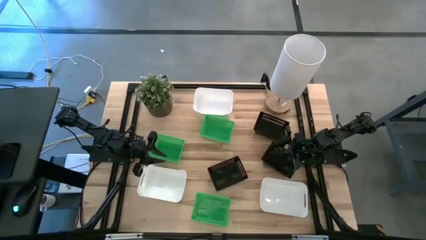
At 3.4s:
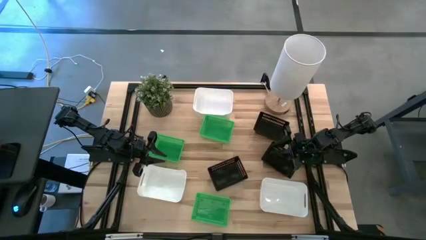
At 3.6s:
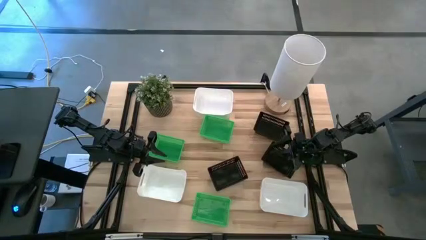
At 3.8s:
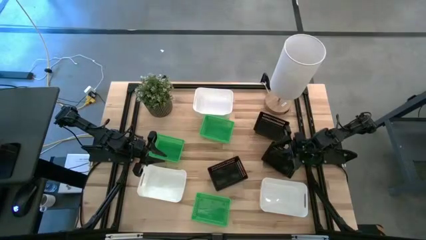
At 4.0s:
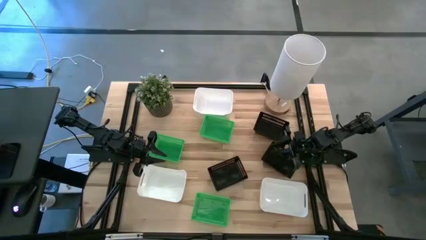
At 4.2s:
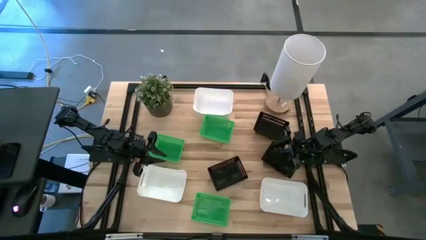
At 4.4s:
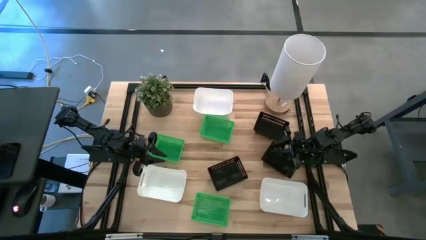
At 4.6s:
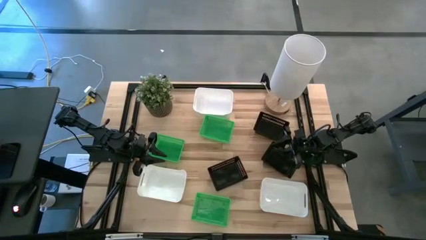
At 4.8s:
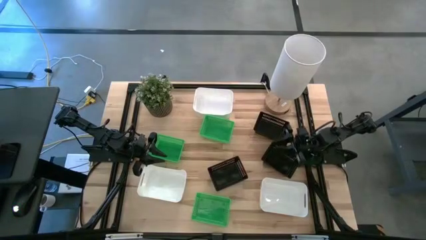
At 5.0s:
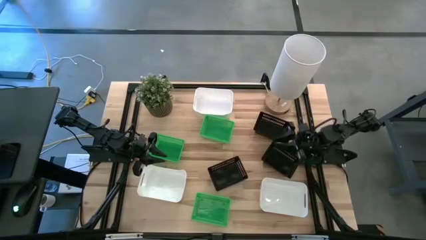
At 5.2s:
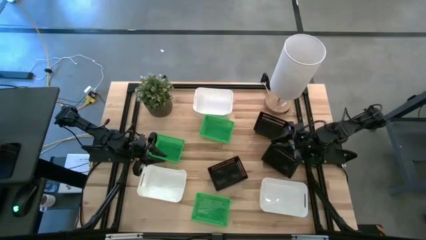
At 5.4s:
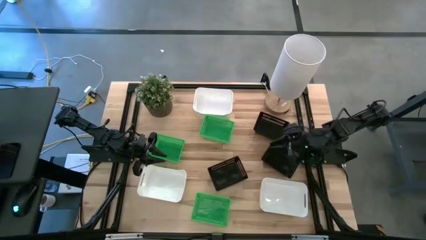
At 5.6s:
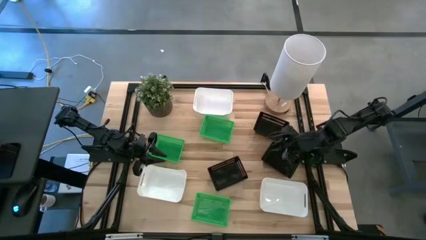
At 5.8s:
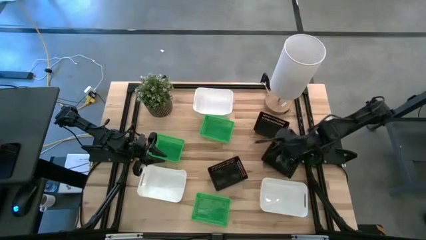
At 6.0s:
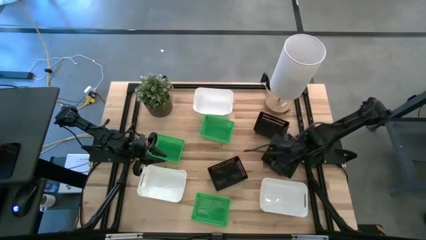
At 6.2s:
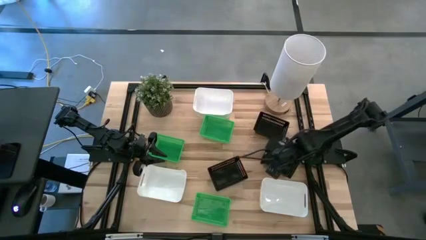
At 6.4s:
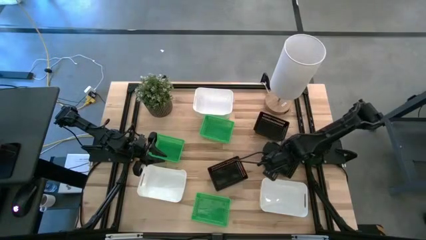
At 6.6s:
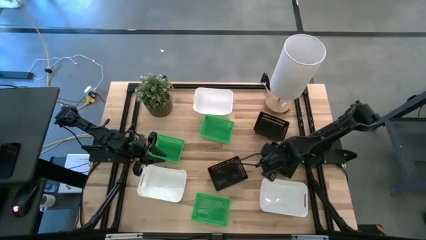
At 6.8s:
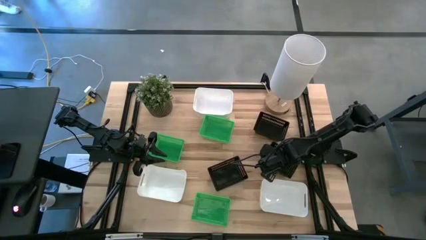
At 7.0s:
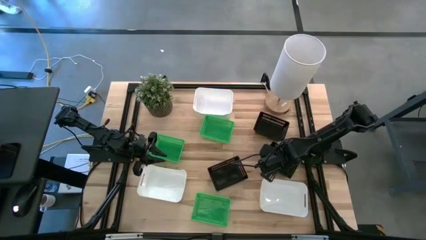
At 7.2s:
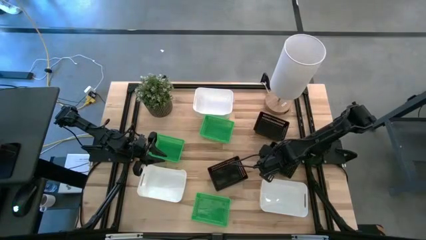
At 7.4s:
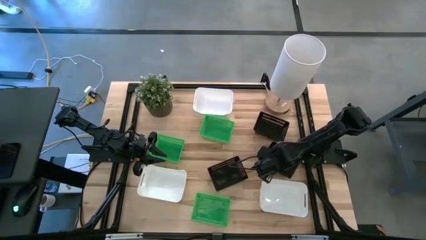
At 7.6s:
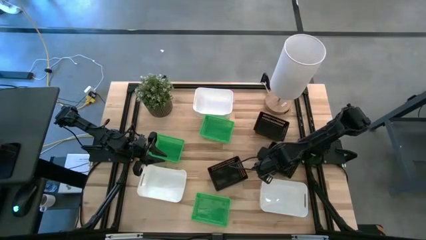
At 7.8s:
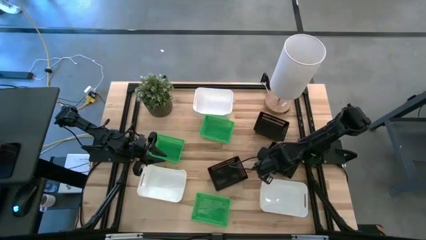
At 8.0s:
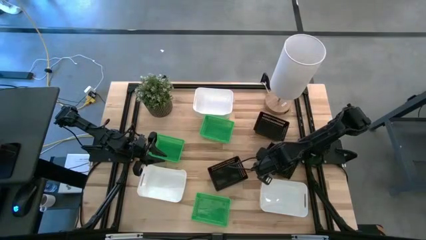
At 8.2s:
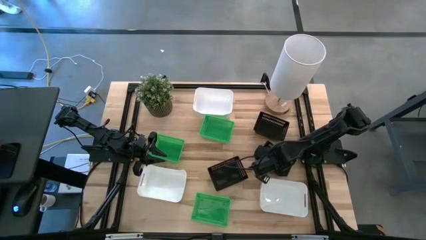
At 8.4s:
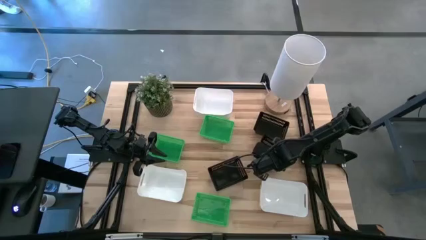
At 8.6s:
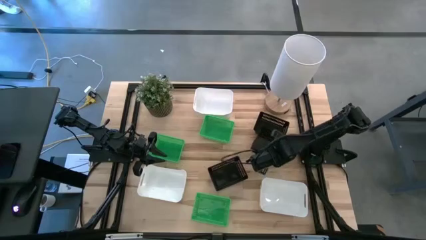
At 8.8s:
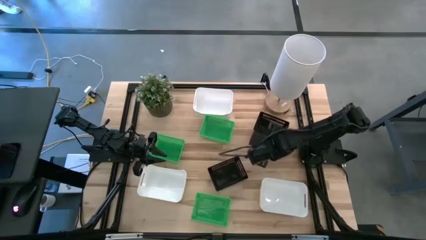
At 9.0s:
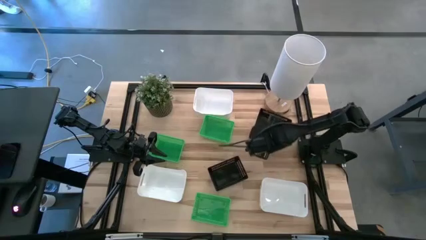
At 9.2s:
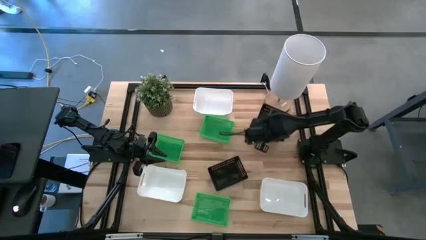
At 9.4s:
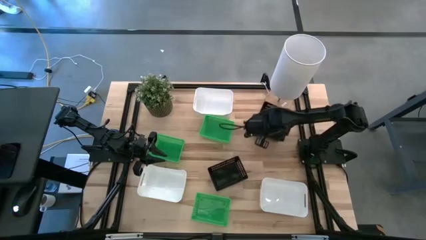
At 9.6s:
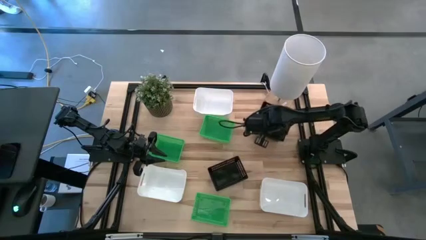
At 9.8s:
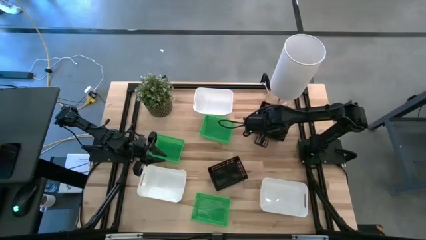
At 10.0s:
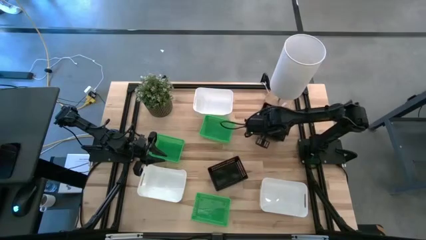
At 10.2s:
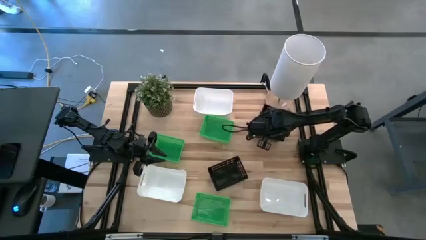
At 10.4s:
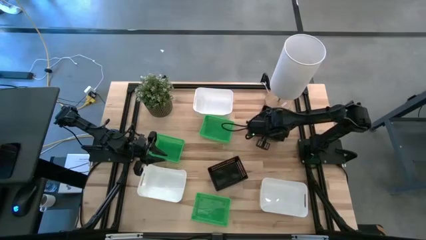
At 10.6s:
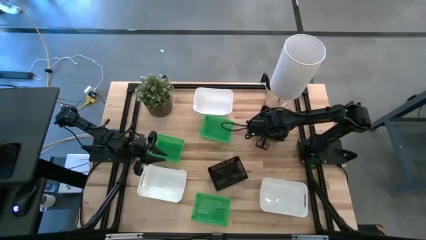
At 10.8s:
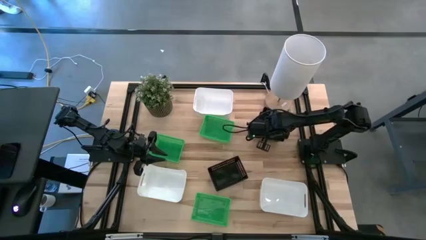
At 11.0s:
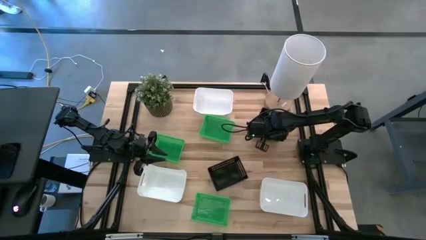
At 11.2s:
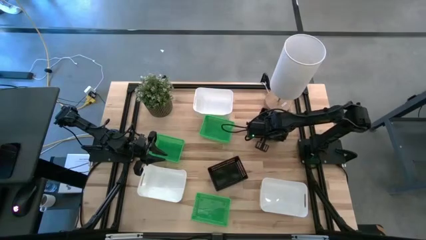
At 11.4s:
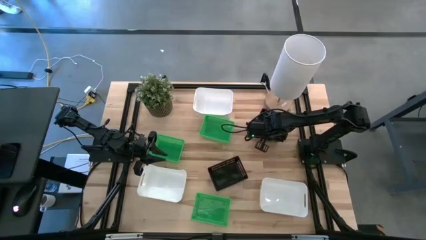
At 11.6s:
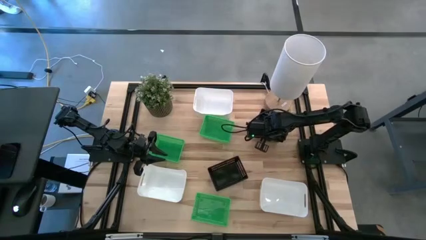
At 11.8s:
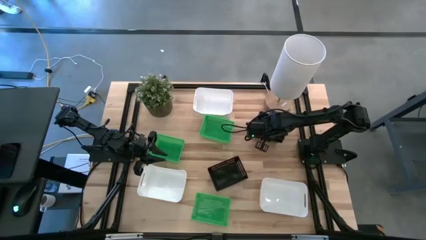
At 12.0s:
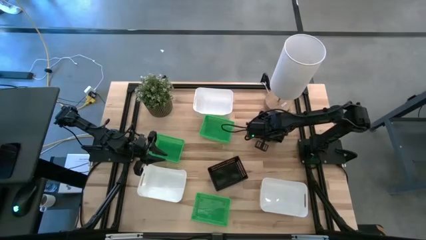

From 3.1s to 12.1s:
Stack the middle black bin on top of the top black bin

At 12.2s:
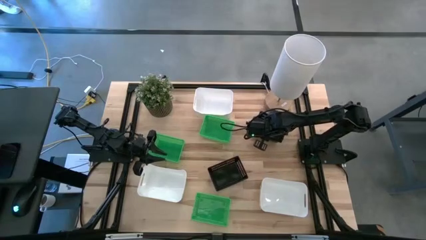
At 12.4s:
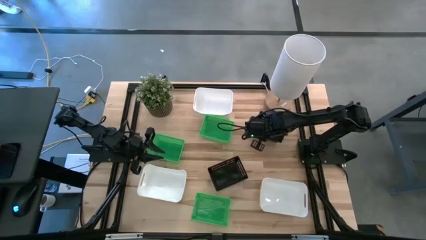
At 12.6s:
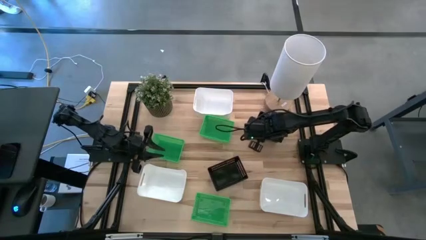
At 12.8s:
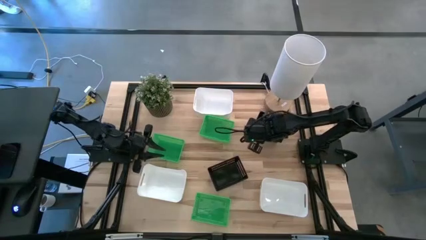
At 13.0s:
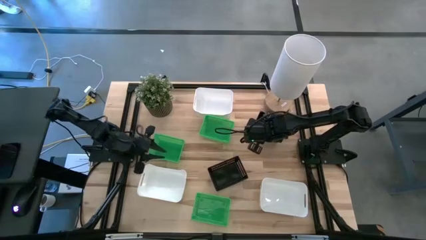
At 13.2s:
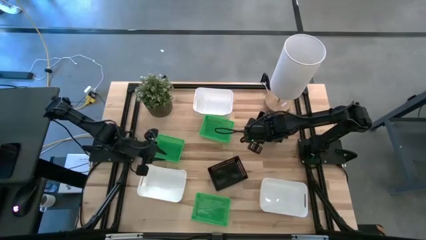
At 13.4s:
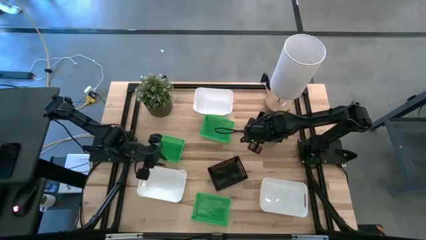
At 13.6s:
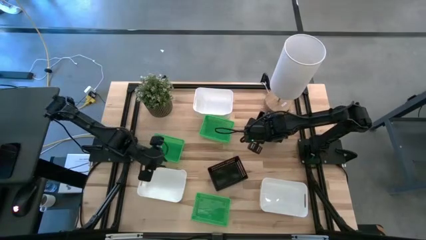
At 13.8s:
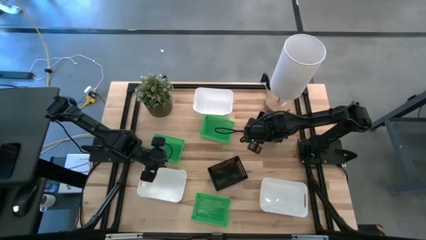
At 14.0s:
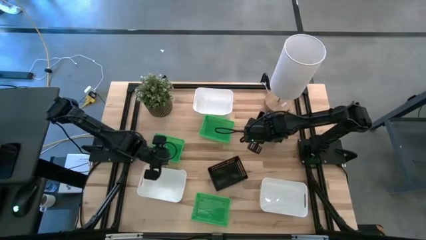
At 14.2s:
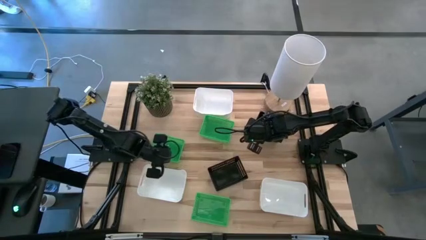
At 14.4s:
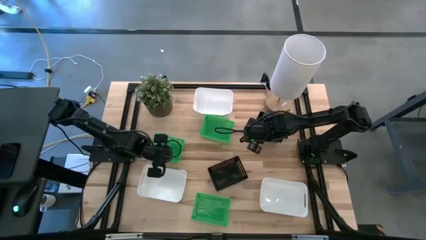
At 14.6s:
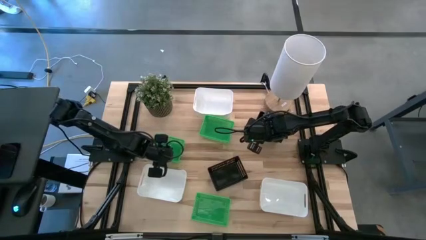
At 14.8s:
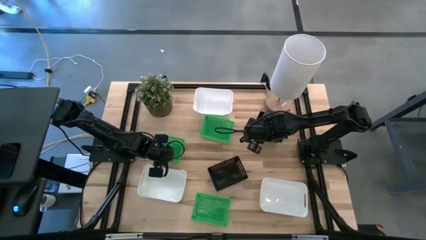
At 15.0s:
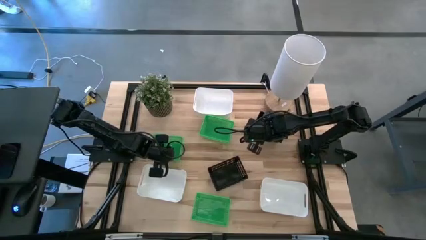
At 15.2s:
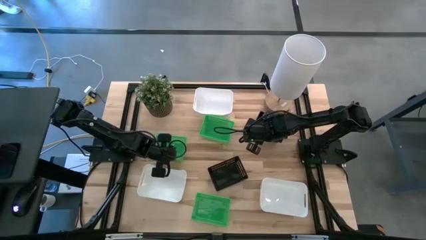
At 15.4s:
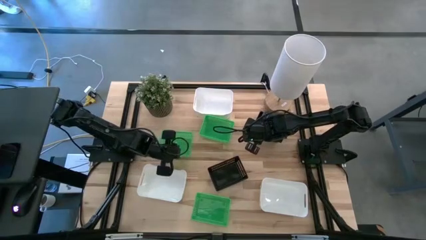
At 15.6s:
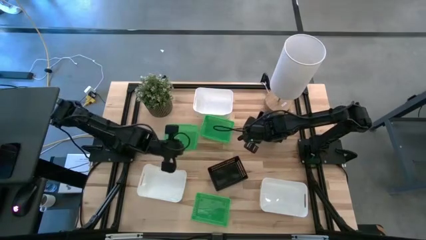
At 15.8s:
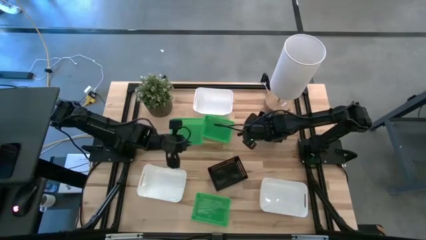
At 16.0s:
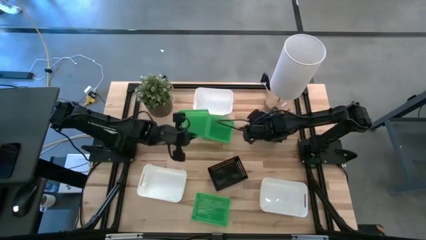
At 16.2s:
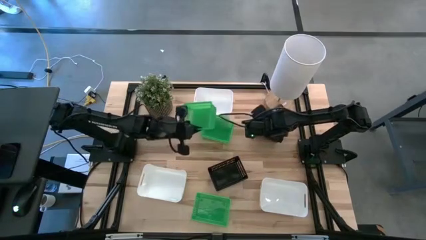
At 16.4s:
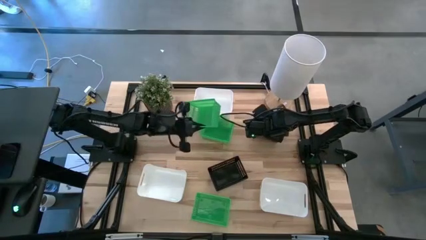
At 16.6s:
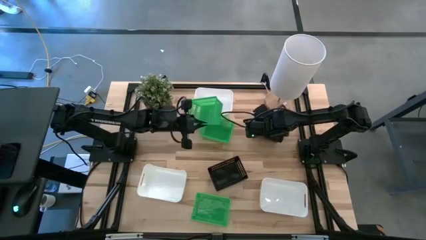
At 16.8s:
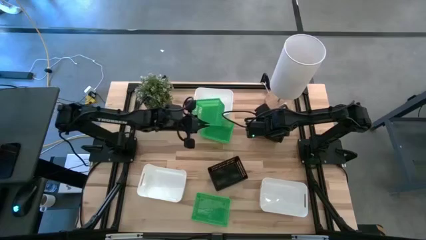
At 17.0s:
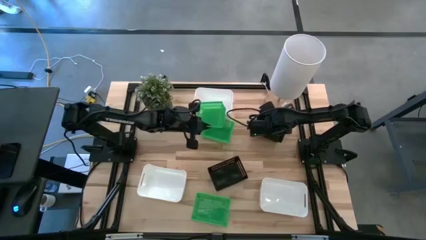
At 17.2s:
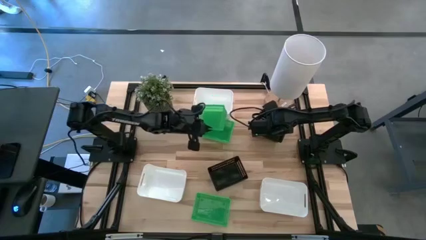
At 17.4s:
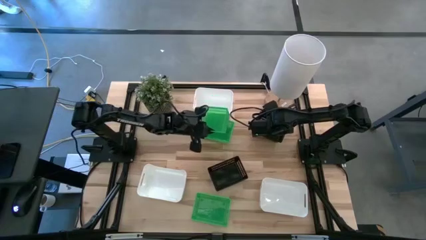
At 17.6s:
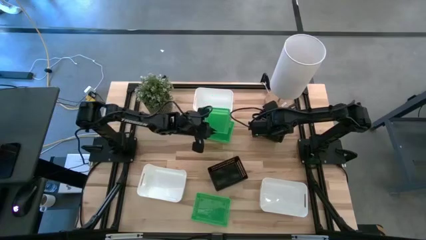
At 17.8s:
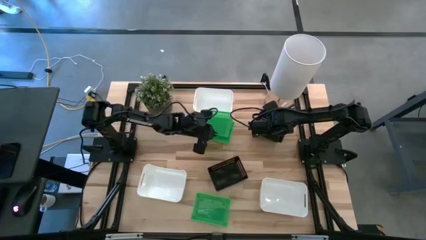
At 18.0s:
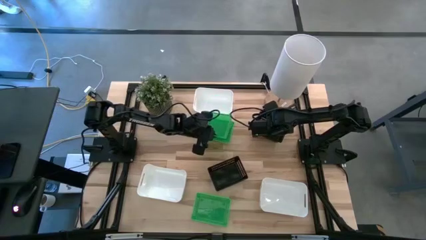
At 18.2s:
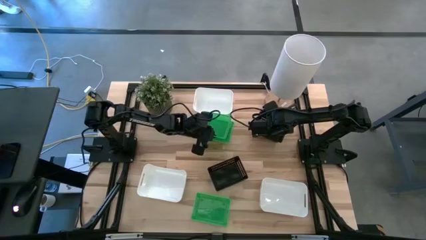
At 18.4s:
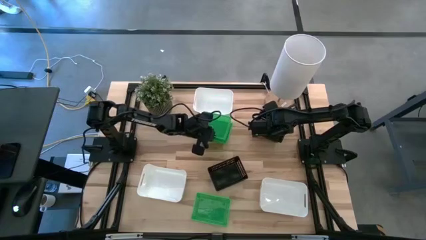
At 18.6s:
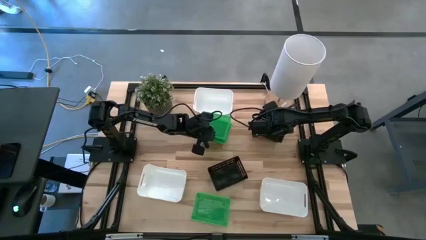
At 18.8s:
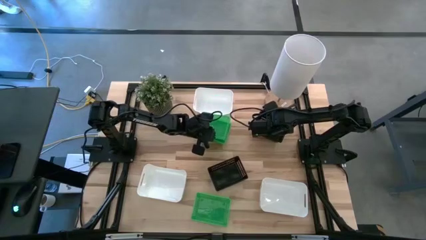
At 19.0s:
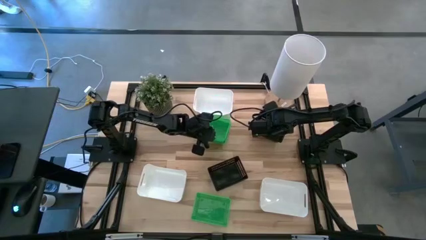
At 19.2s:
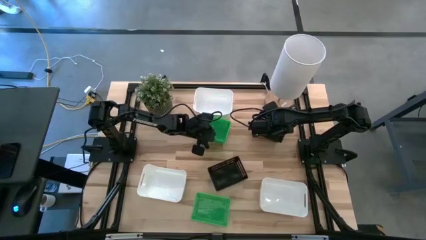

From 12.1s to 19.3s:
Stack the middle green bin on top of the top green bin
